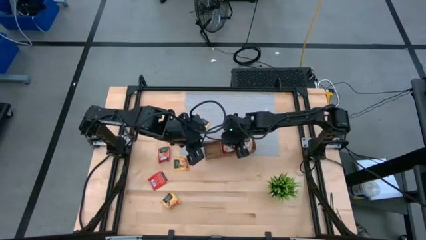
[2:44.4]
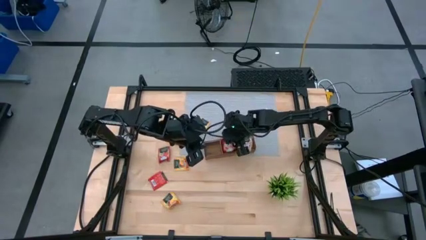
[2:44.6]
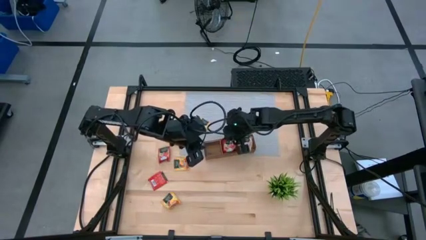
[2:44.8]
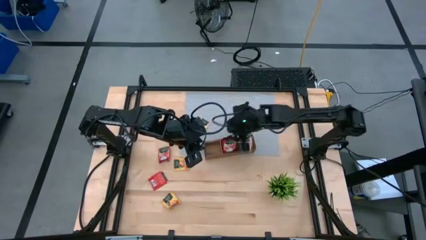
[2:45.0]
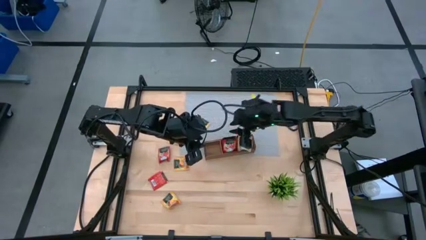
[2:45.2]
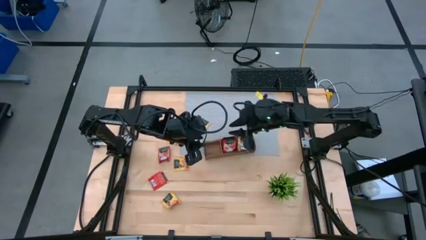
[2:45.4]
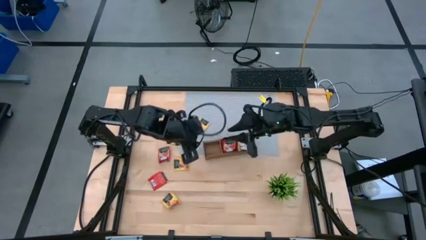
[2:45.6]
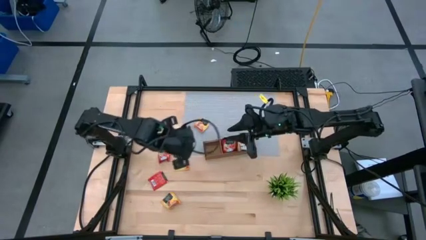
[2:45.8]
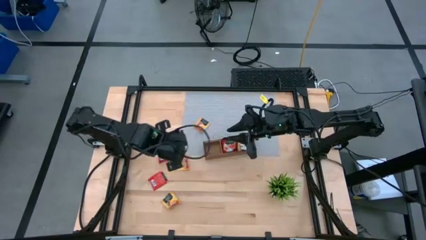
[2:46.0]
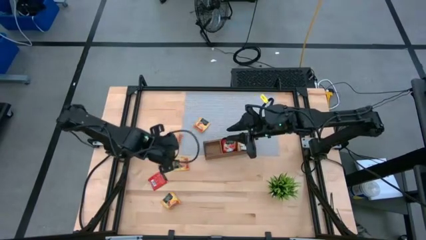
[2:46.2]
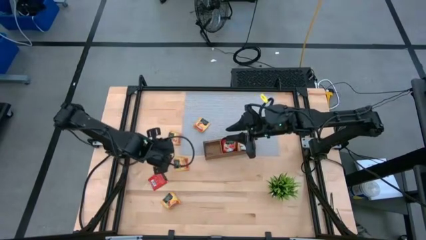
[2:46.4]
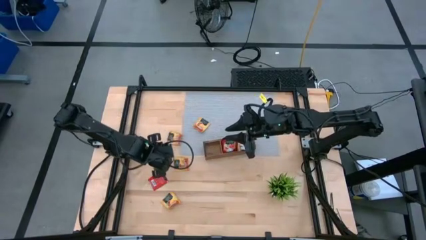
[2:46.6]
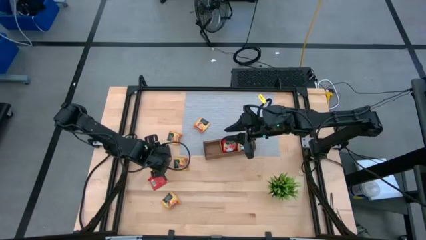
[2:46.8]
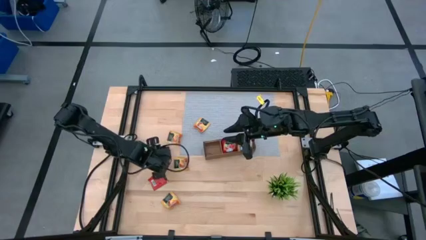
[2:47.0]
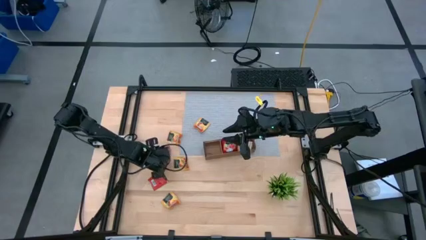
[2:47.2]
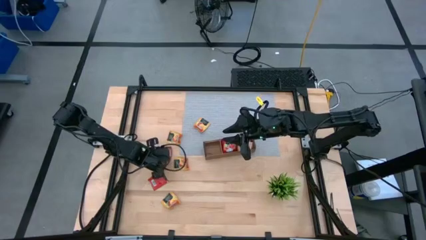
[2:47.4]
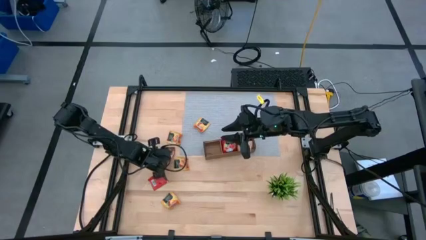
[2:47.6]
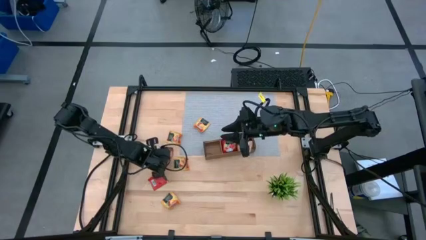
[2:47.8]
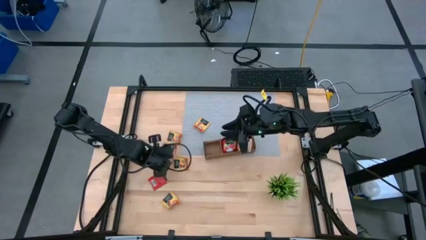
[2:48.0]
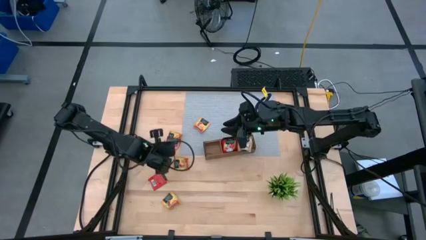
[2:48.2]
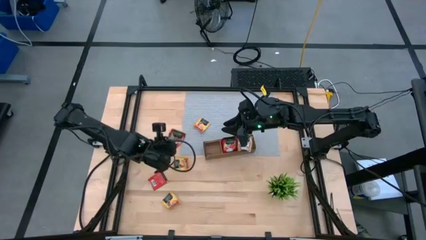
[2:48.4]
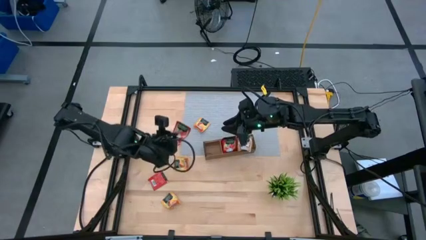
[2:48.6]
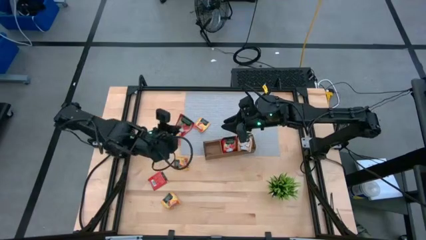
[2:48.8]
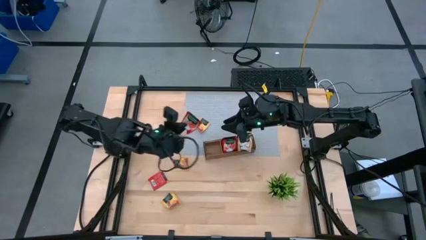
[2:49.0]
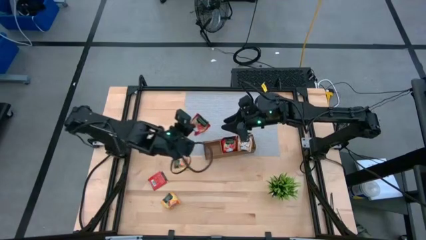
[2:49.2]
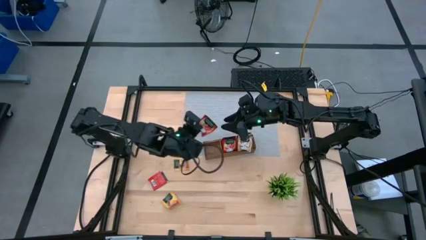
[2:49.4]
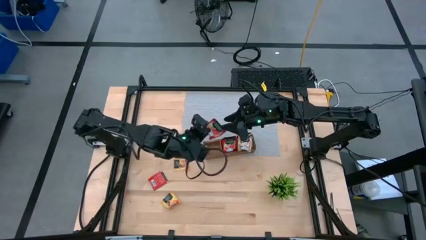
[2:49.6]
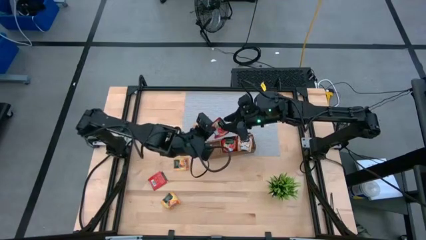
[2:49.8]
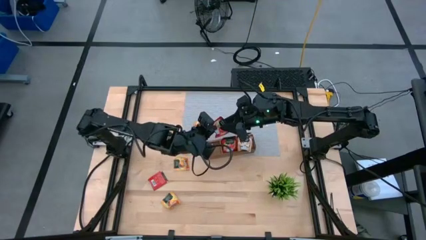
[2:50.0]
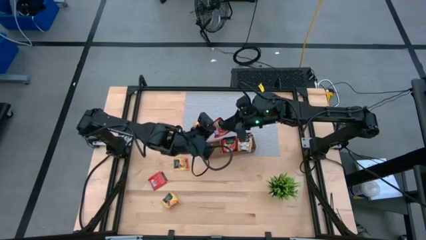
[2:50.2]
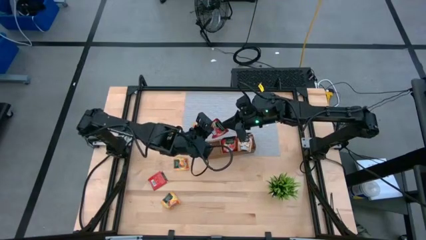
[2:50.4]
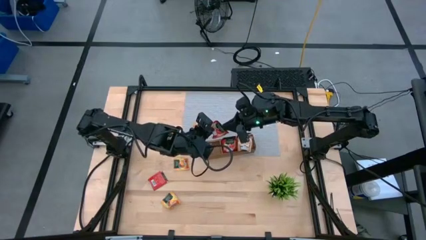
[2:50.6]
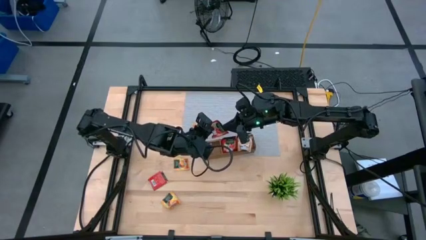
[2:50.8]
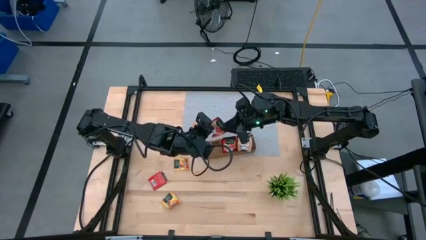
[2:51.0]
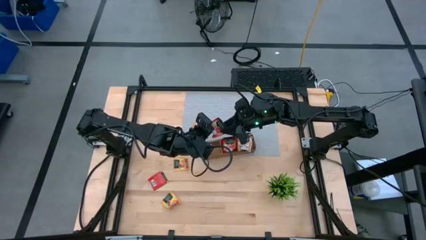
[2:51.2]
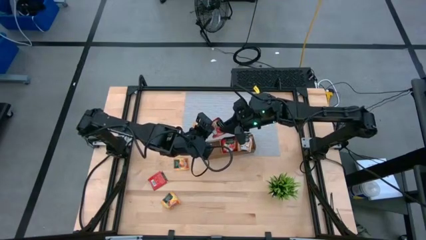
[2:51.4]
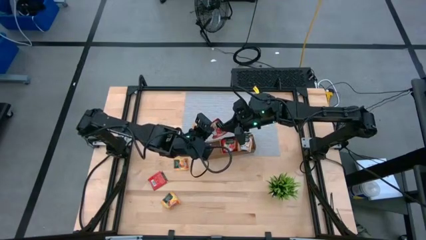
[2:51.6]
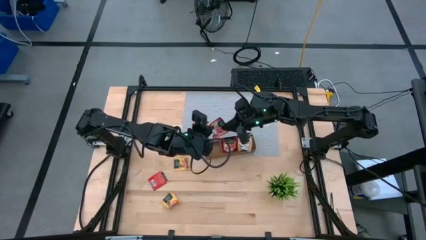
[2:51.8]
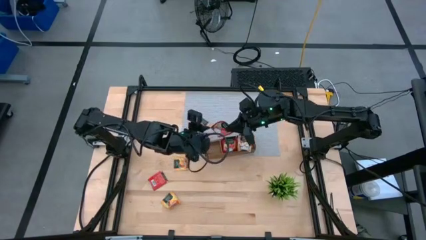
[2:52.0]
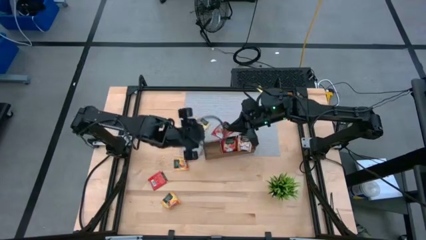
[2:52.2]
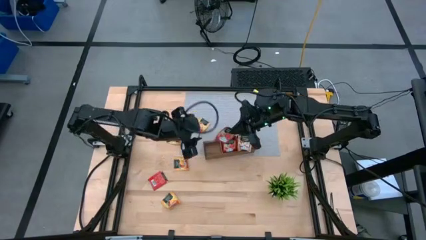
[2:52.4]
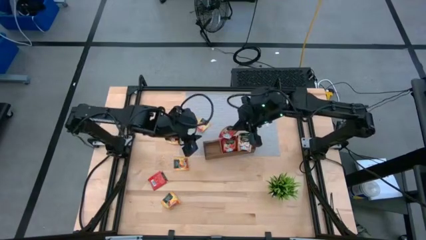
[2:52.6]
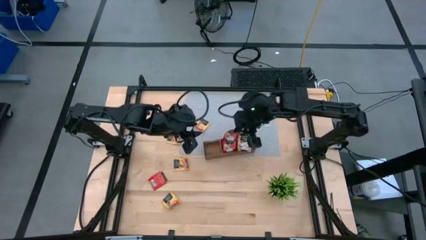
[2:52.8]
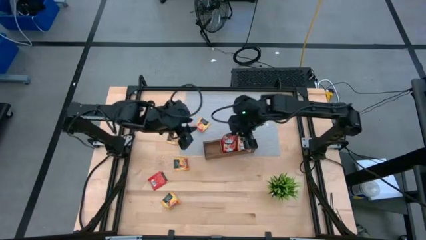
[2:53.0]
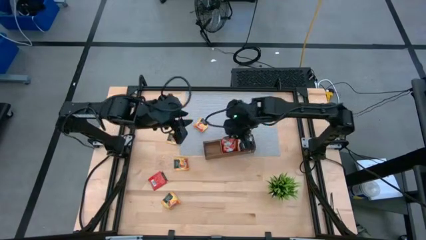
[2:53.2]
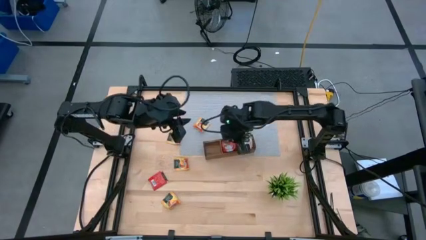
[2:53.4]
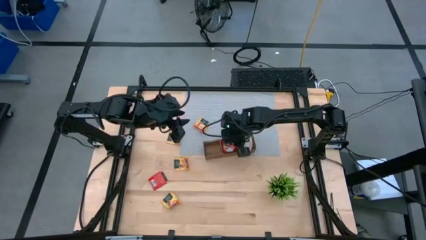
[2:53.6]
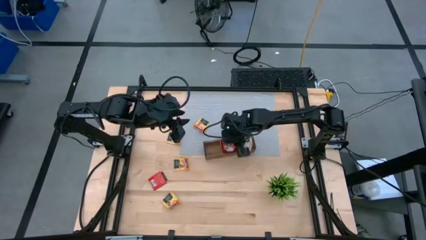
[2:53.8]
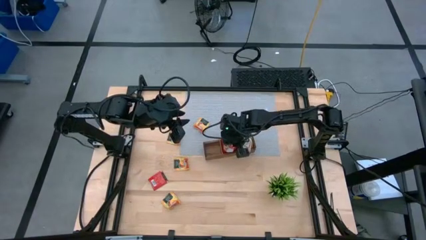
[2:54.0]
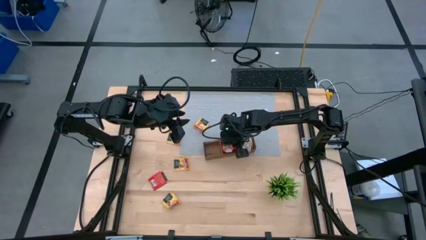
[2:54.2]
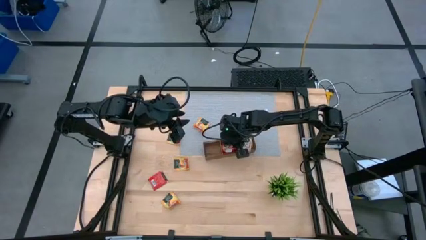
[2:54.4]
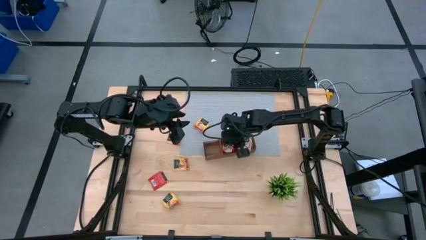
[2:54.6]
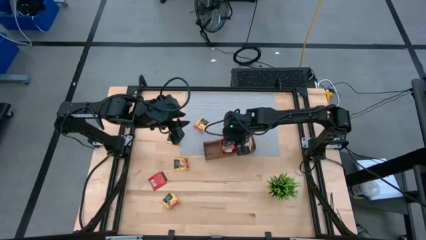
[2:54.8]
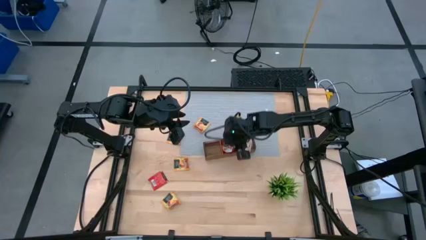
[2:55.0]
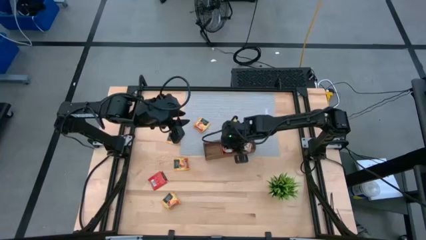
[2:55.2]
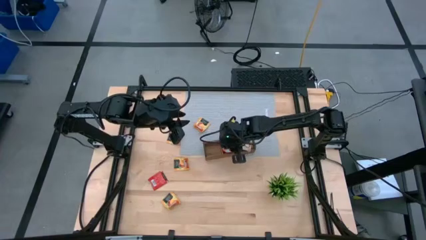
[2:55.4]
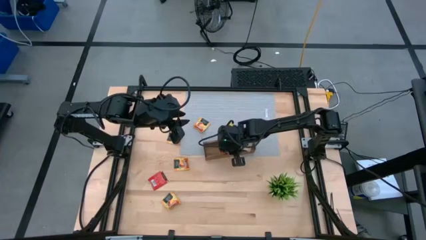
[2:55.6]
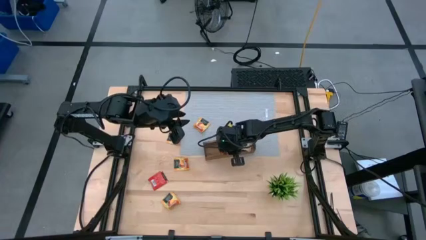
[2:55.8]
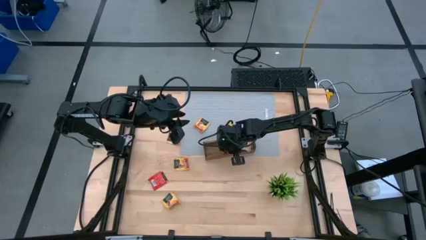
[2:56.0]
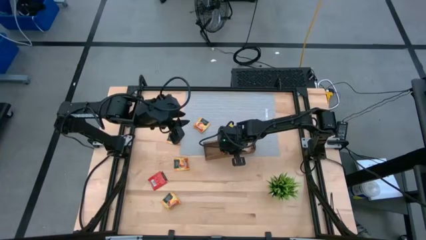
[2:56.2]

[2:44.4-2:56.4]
Task: Pick & Place Tea
Put the red tea bag into the middle section of the wooden organizer
